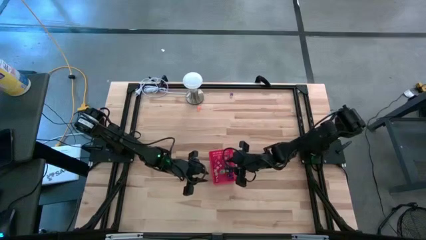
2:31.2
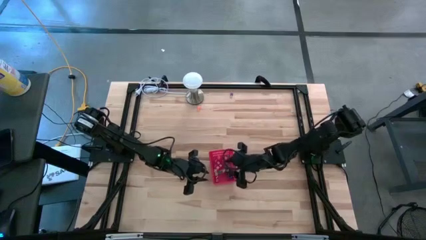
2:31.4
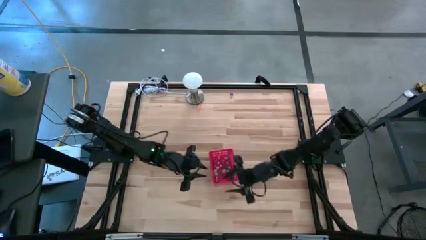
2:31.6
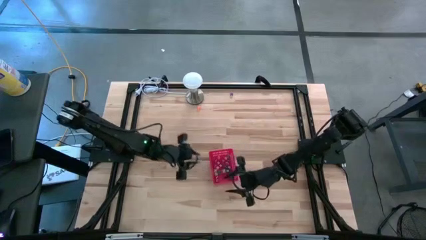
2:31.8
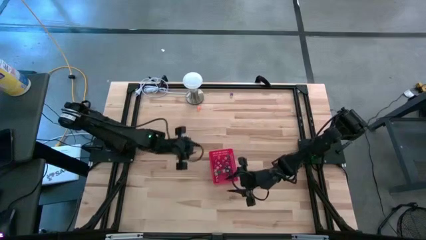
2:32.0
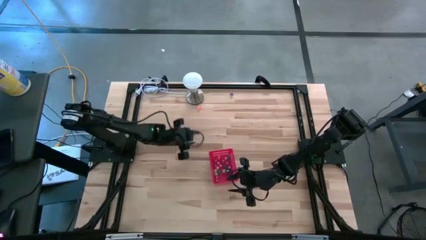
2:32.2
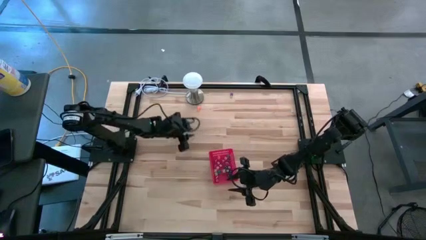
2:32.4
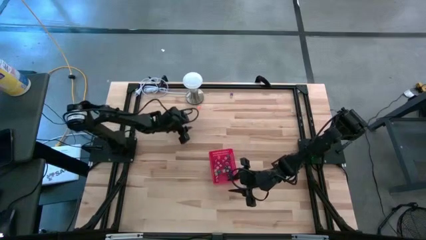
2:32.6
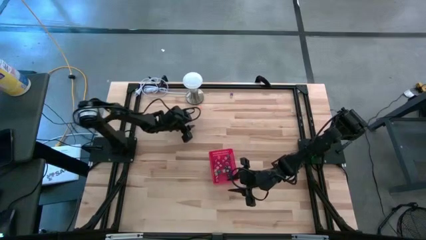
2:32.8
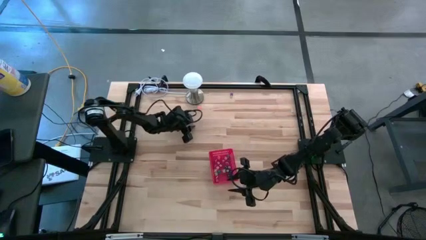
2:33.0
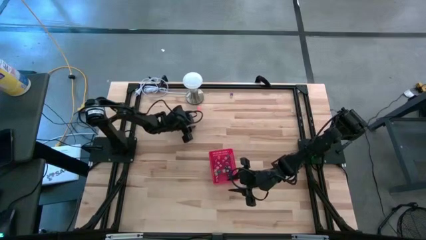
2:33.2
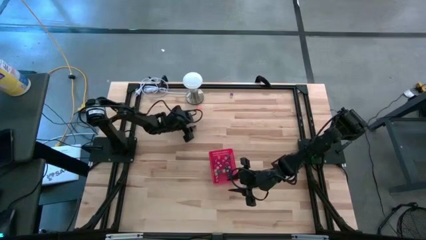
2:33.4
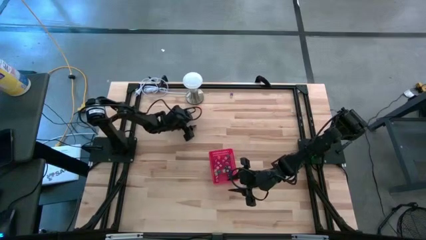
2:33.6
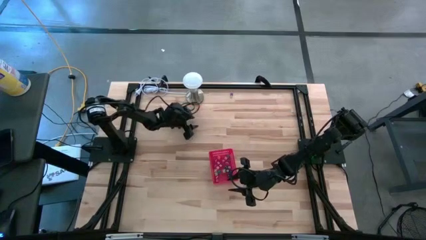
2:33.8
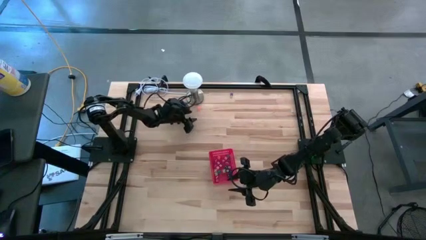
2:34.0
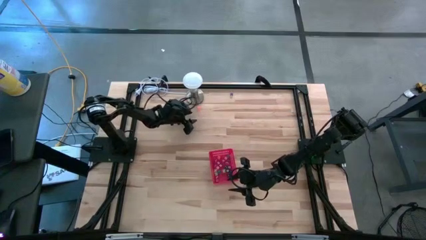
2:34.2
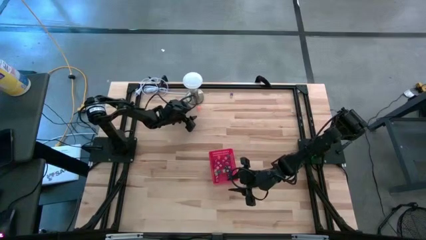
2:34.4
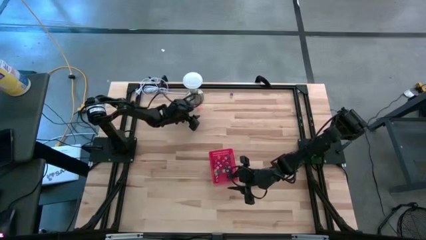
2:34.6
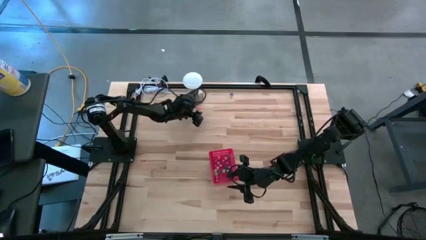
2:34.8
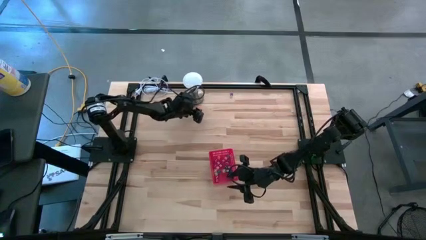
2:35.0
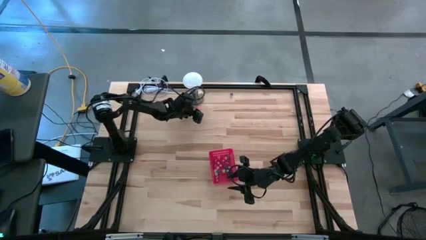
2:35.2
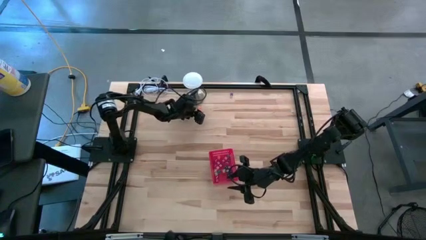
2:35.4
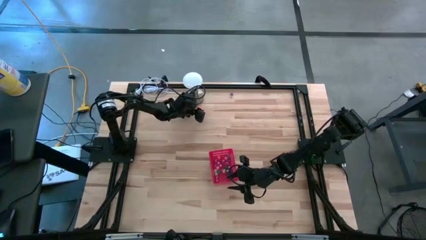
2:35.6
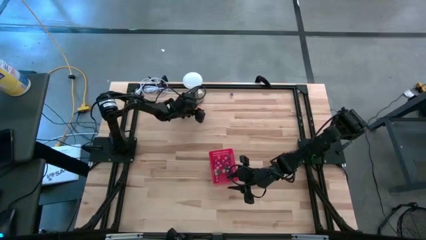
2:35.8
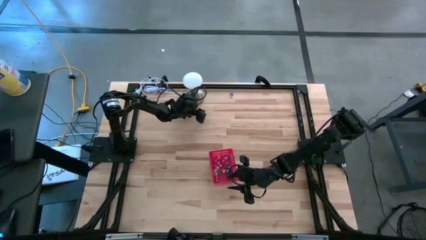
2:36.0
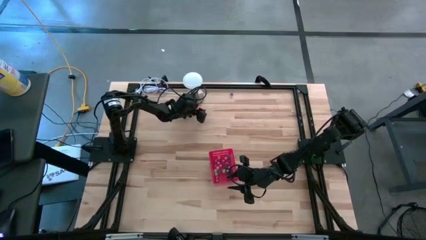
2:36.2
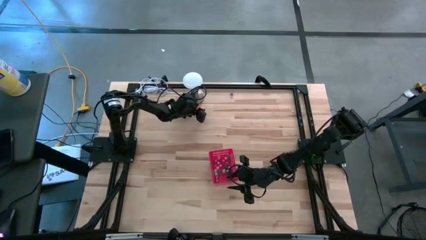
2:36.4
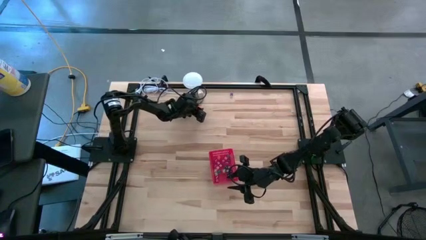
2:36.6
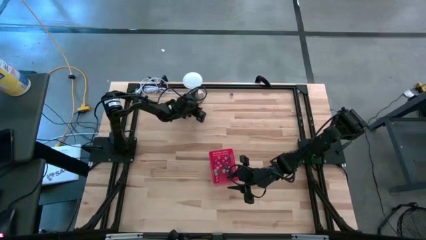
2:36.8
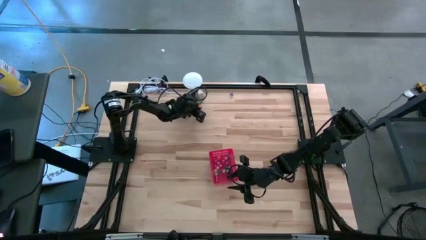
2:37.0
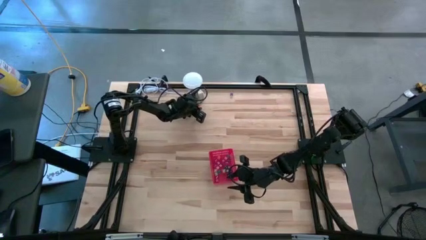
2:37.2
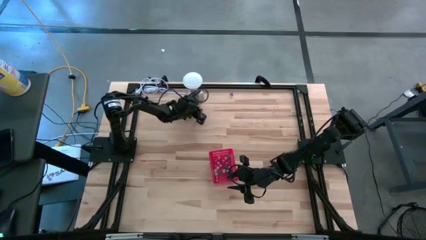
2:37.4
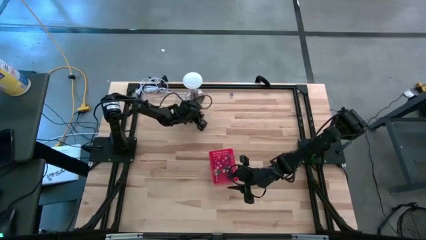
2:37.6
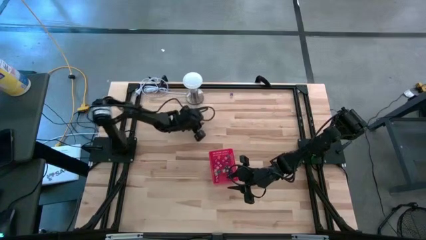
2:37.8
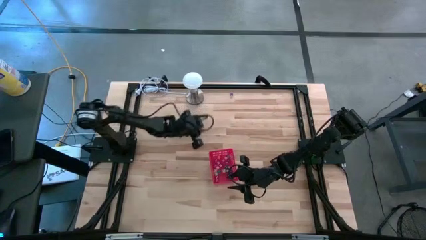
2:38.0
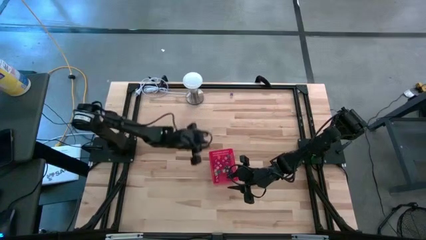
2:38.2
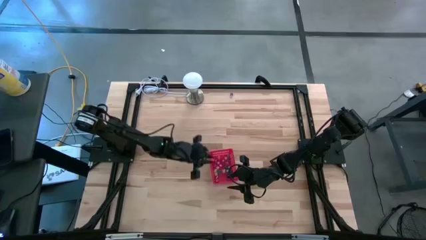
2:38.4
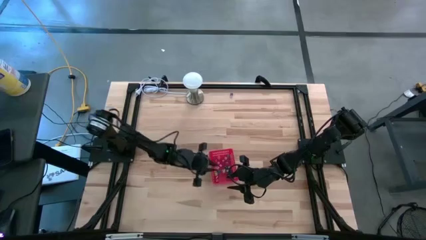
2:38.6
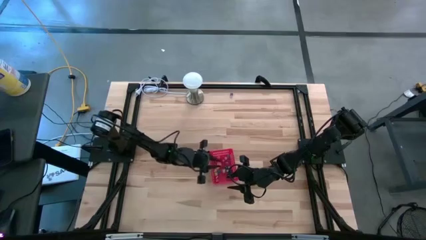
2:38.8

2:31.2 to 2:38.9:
Task: Pick & Place Dice
Put the orange die into the red basket

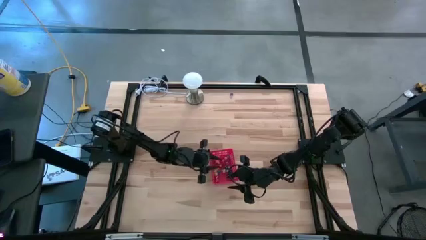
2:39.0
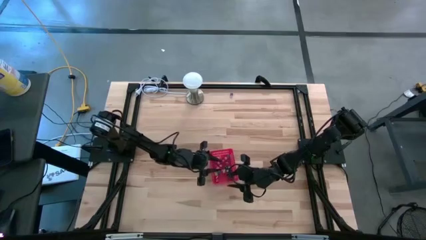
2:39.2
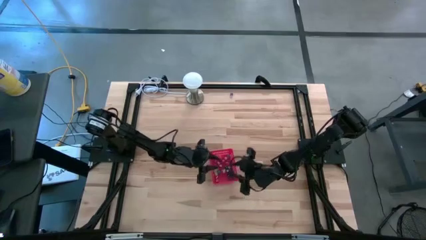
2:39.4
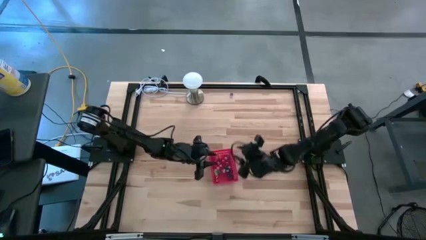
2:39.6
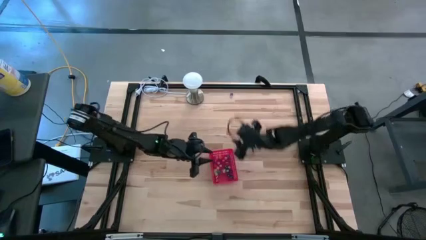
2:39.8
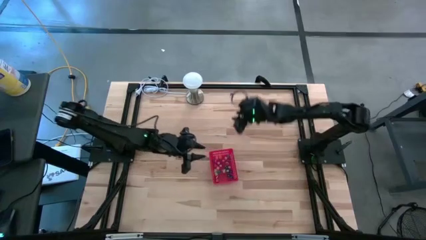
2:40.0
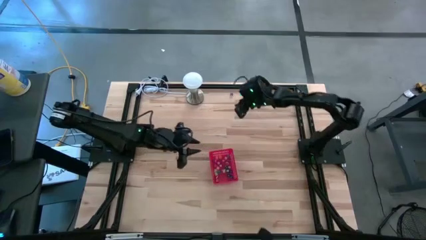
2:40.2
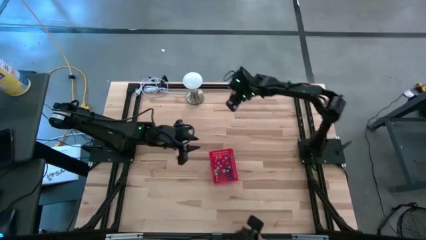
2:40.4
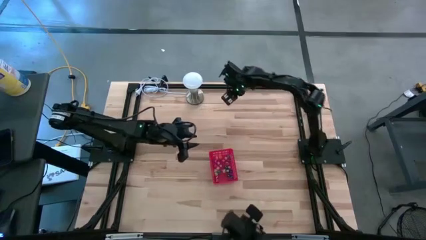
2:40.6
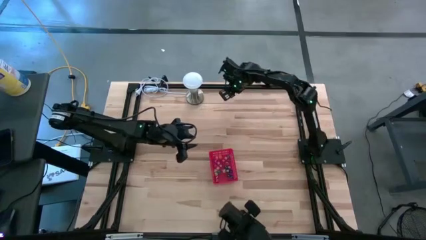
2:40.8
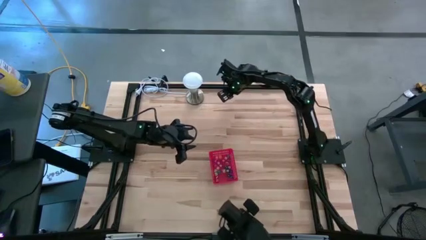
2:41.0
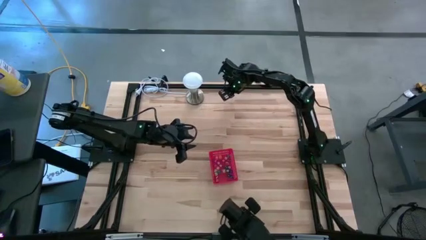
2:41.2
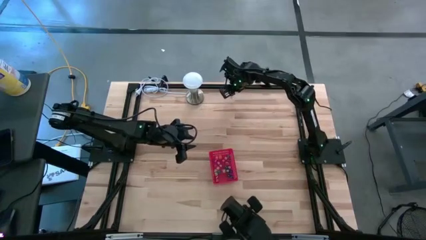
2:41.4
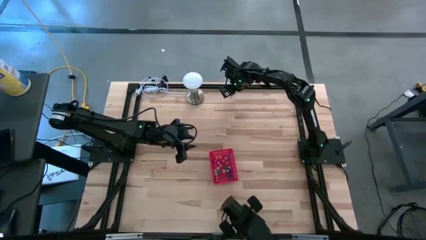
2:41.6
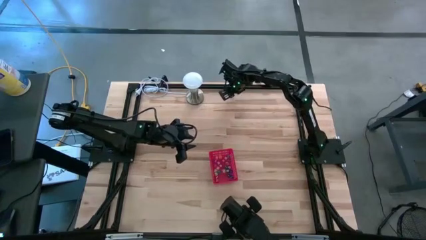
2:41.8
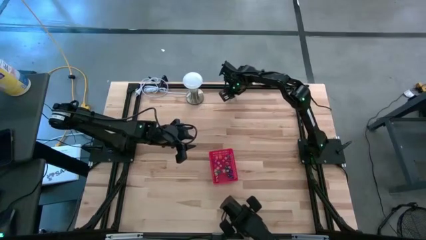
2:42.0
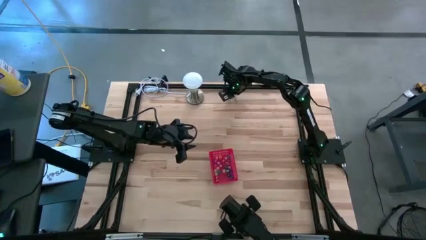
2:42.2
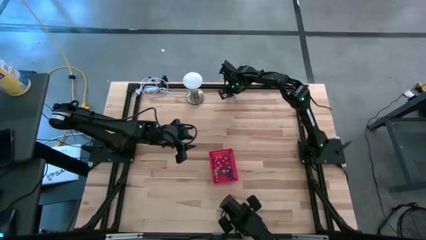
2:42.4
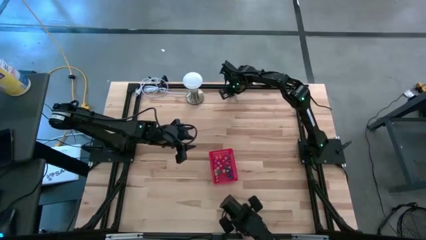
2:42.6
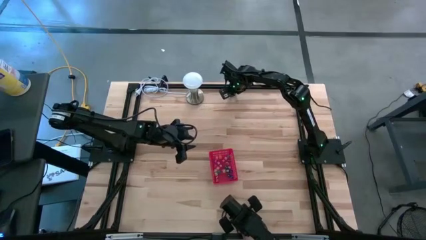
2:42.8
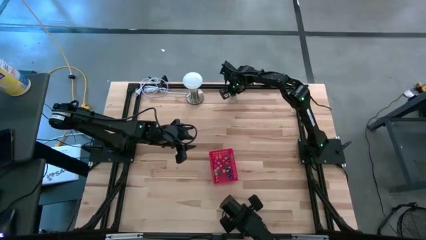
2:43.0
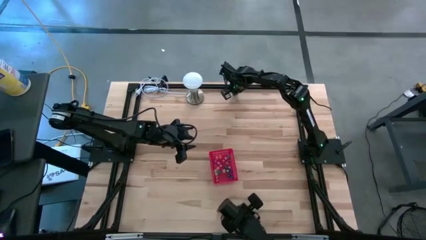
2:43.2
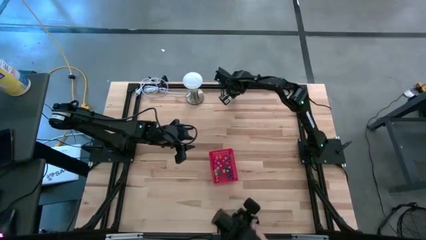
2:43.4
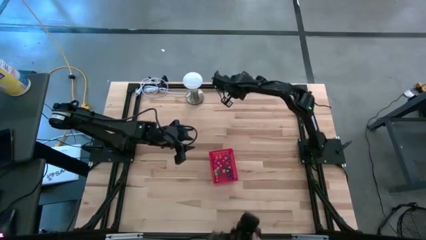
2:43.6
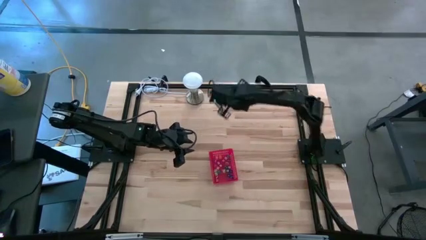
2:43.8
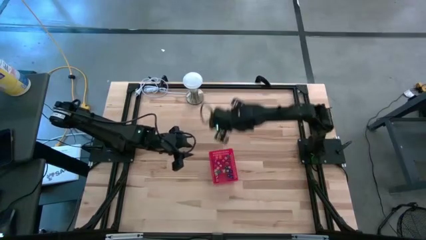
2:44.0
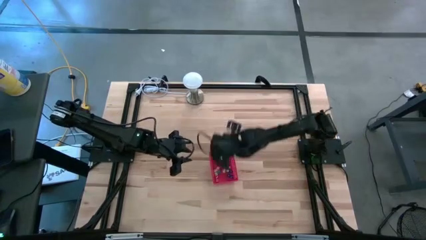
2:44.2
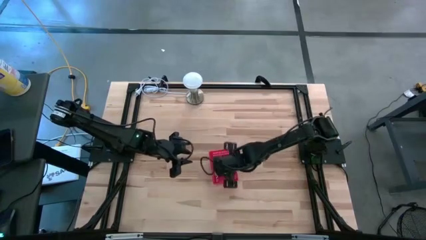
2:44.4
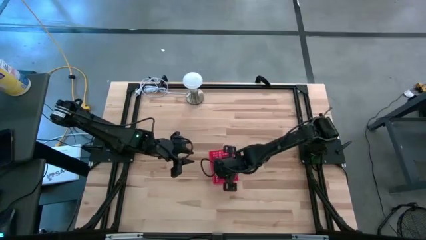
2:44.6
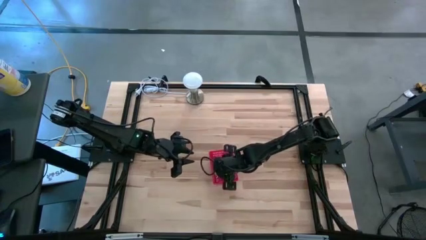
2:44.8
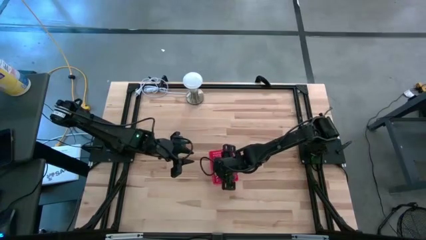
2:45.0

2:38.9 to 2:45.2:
Put the purple die into the red basket
